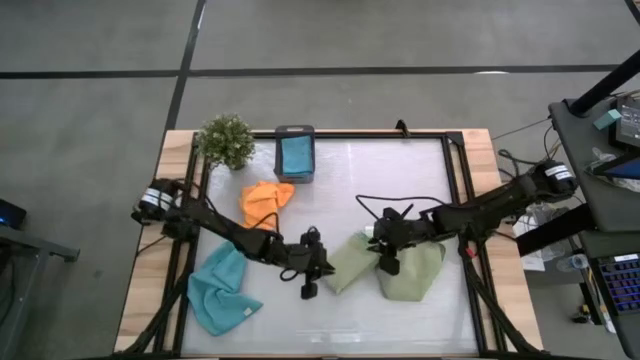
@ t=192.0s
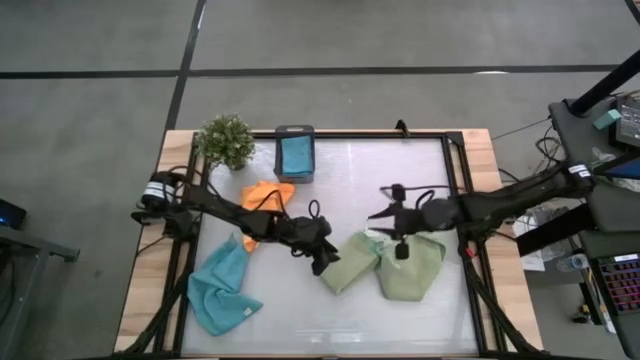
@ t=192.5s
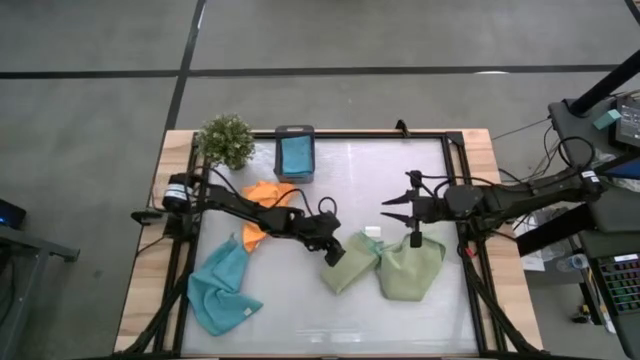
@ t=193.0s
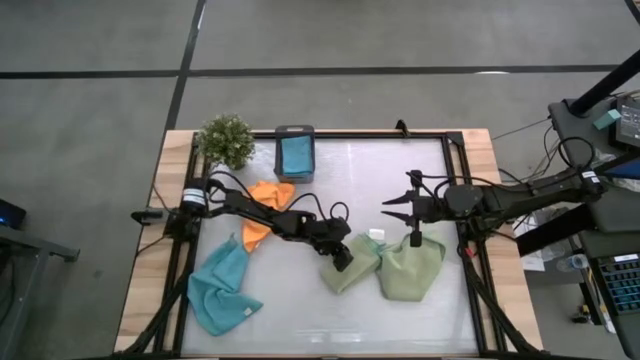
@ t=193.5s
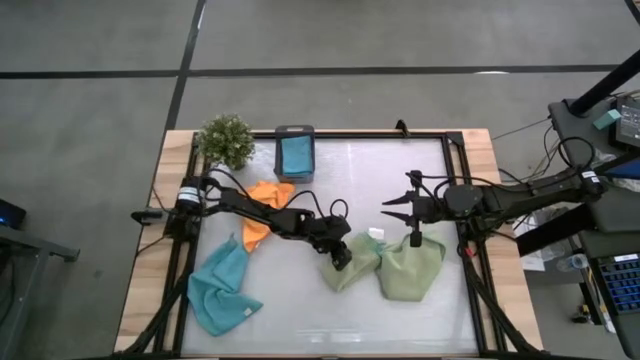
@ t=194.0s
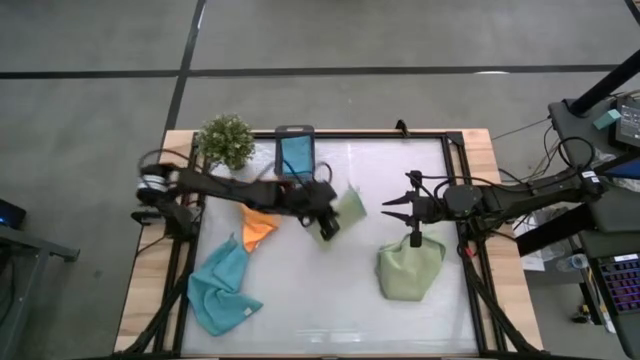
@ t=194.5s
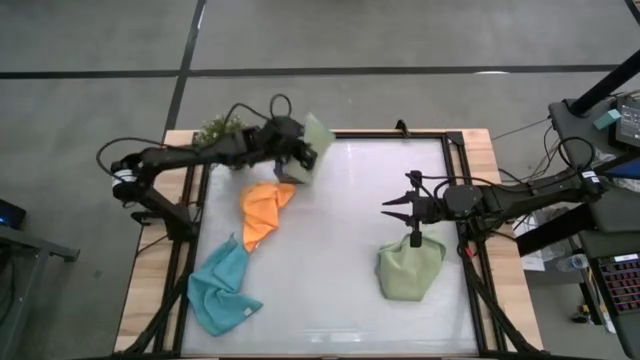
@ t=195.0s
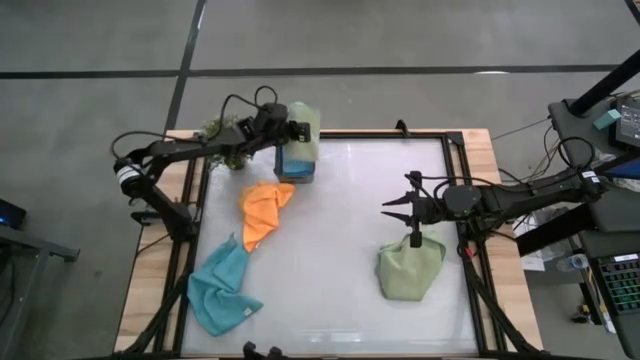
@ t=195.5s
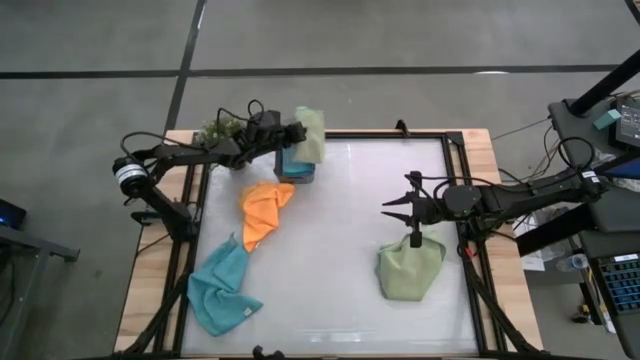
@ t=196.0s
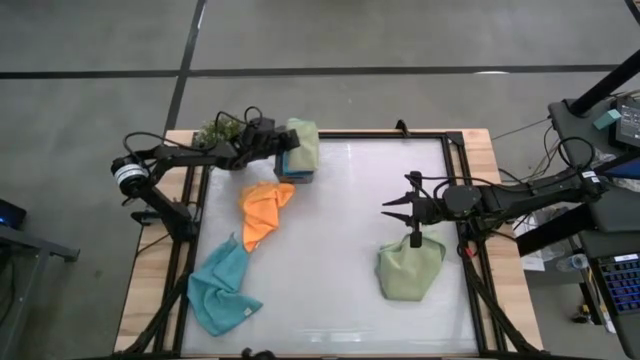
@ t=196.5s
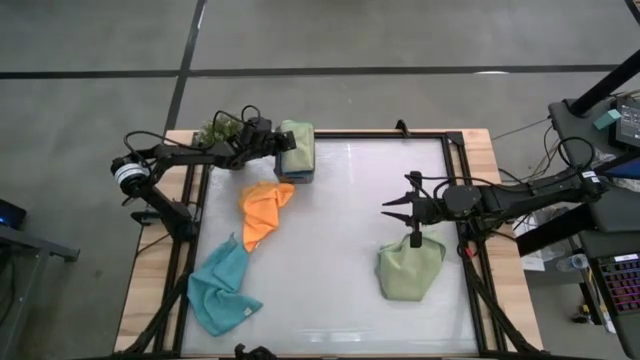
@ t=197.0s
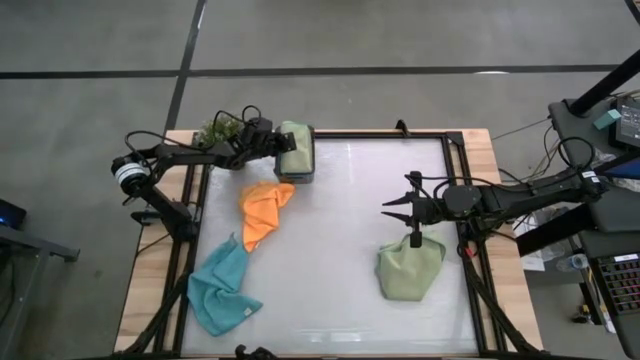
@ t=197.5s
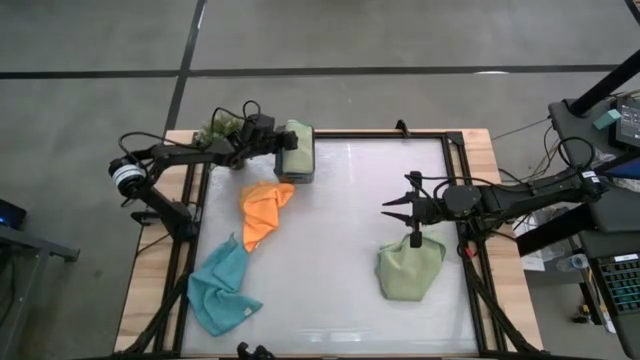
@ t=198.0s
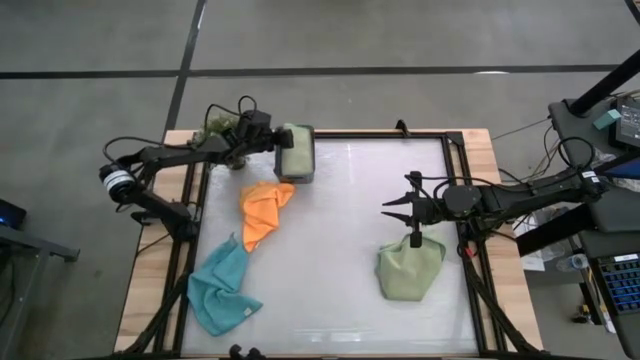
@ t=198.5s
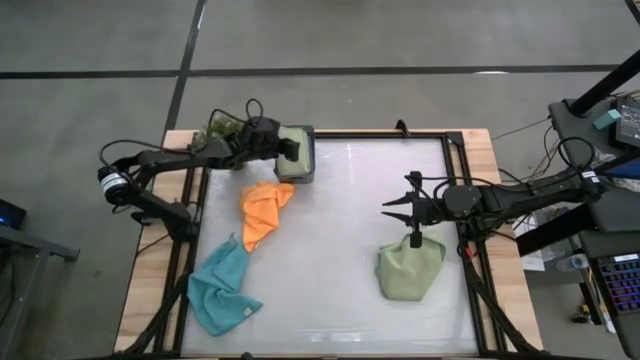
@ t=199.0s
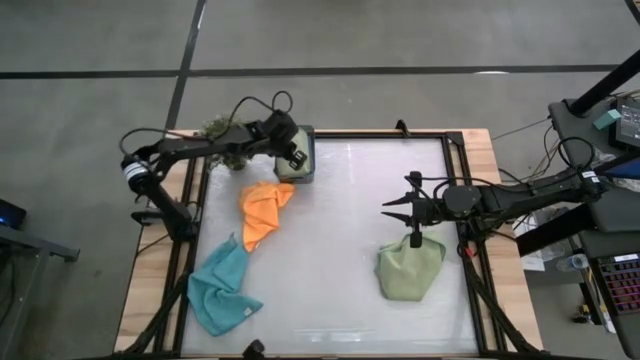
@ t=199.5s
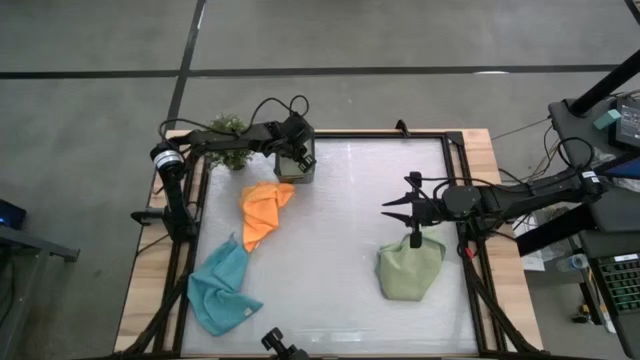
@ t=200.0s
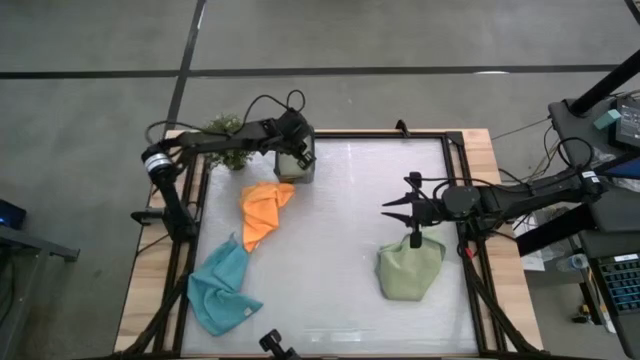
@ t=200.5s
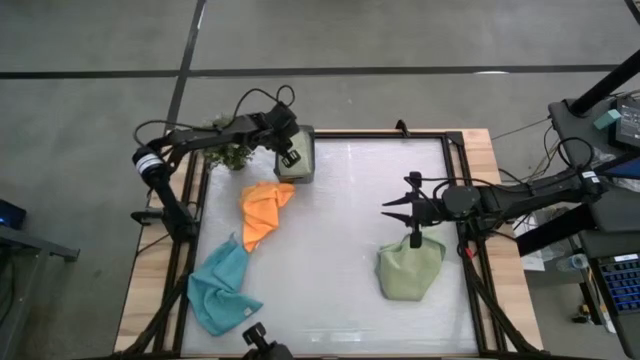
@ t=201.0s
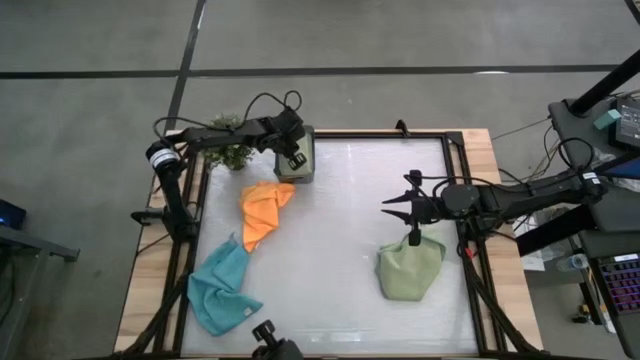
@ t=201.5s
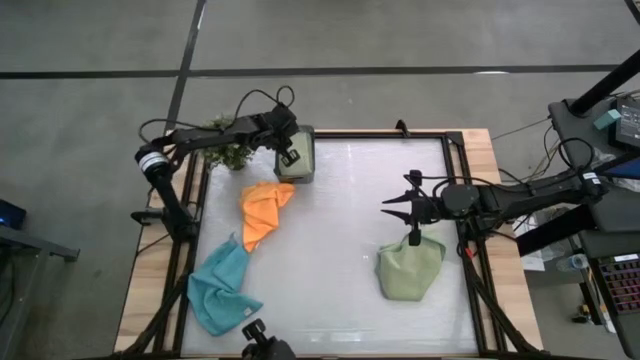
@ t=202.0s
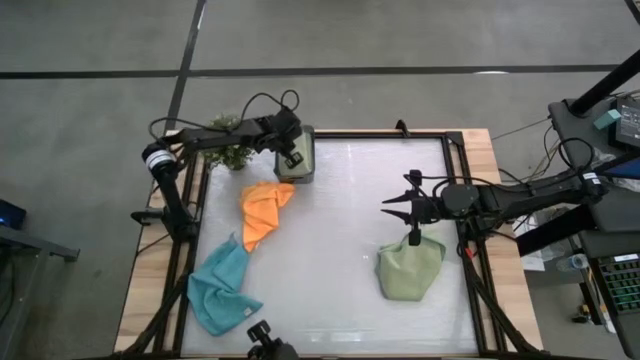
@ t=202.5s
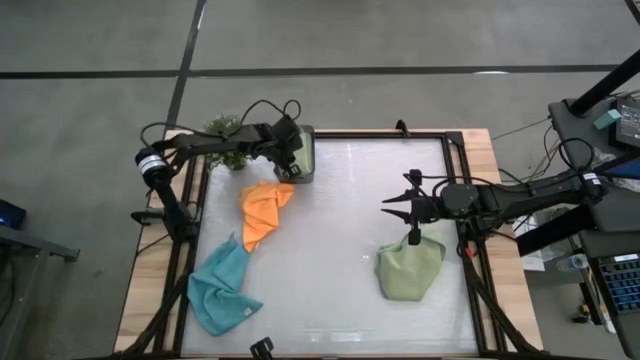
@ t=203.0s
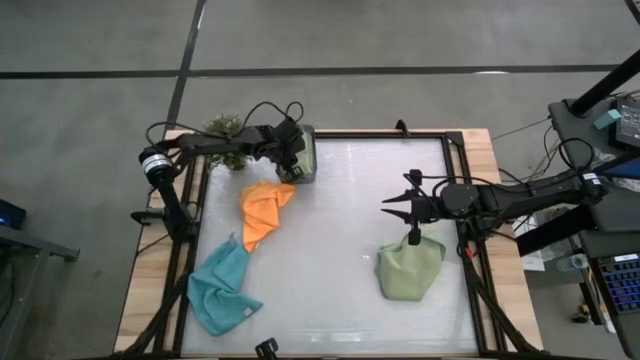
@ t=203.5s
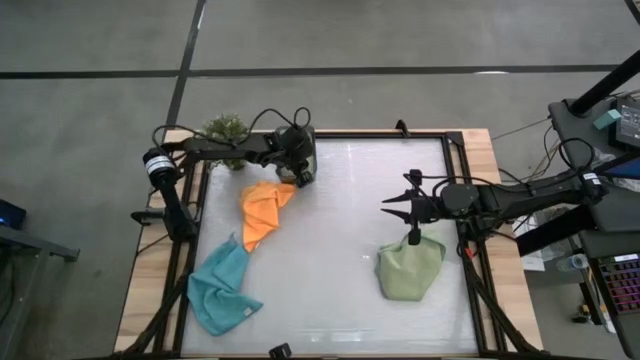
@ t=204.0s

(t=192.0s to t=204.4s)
Task: Fold microfiber towels
Put the top green folded towel into the bin
